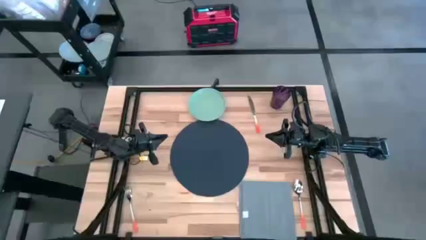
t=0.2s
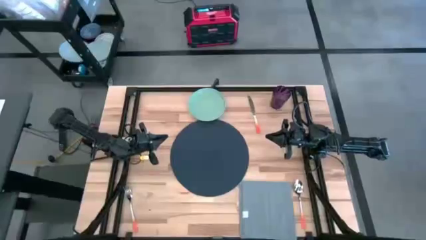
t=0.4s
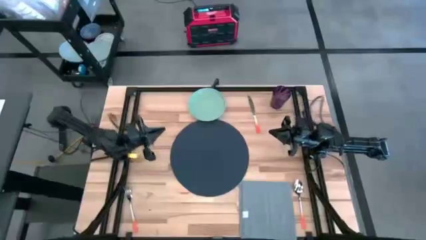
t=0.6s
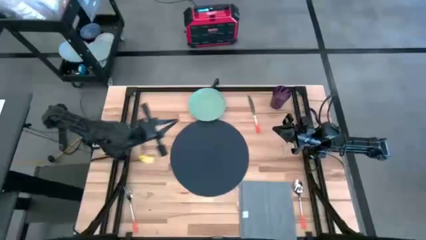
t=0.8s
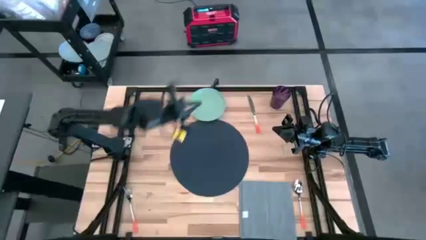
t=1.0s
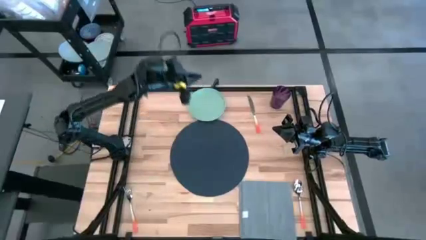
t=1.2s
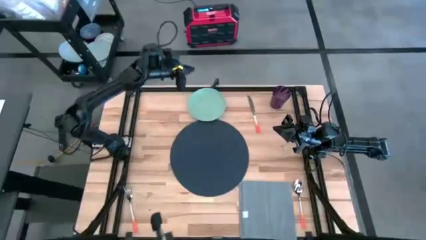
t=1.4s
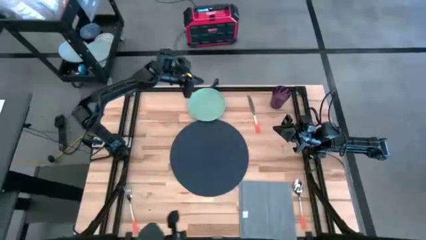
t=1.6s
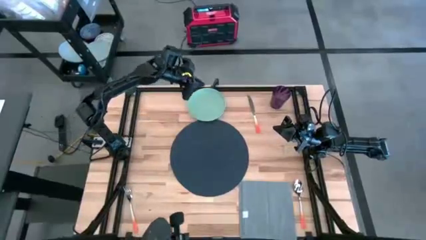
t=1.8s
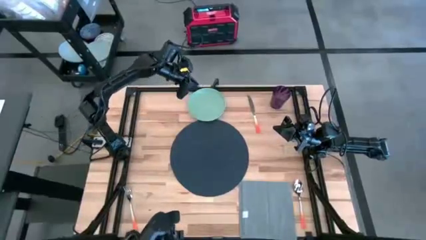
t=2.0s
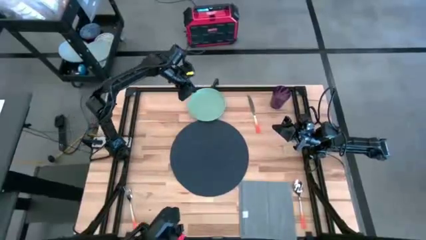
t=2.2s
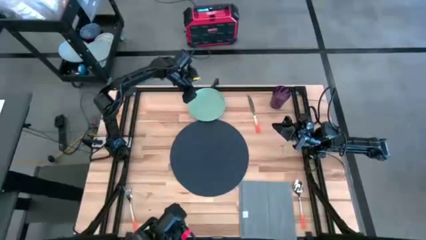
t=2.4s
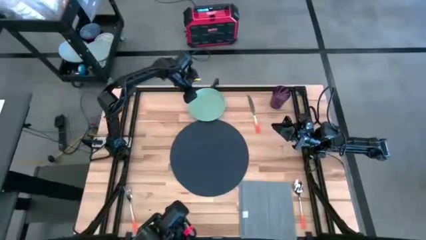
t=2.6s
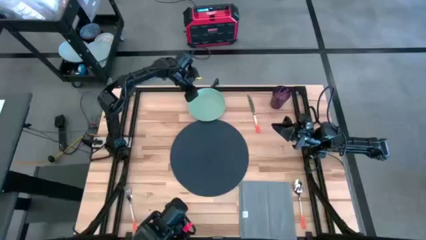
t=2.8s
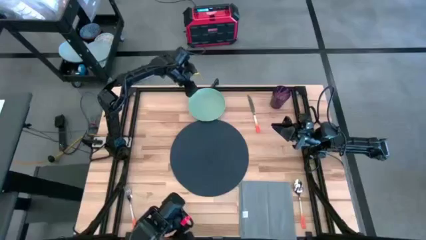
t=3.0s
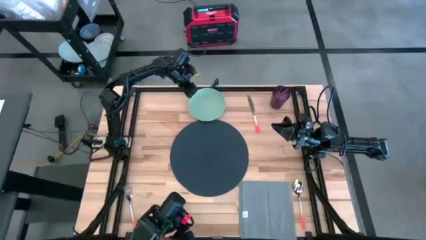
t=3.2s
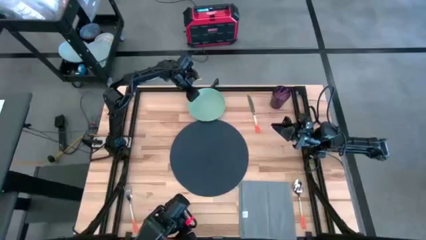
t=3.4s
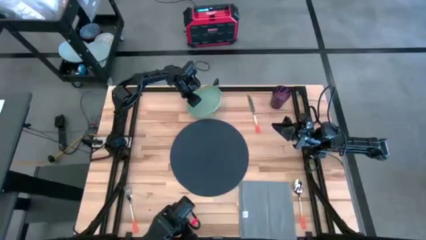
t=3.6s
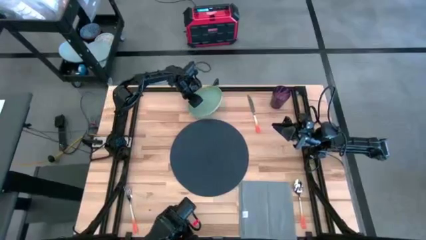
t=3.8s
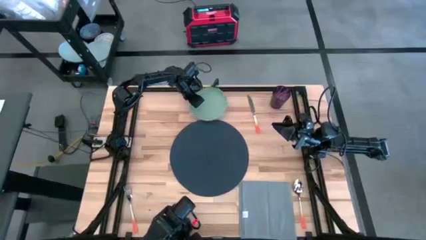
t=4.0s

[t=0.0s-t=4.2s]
Task: Set table place
Put the green plate on the blue placemat

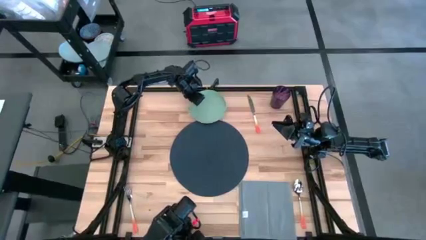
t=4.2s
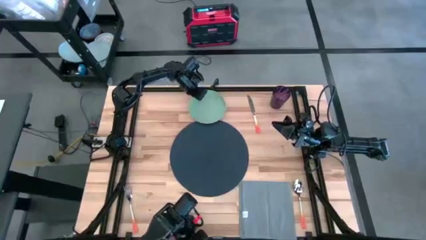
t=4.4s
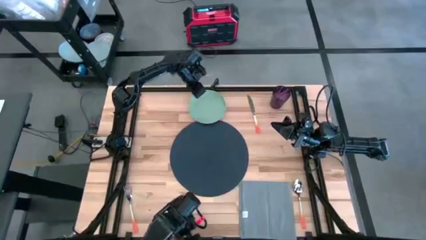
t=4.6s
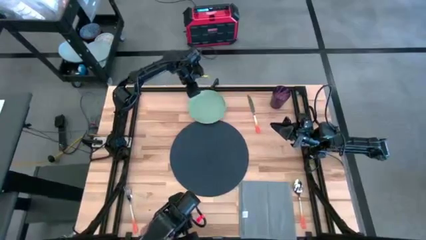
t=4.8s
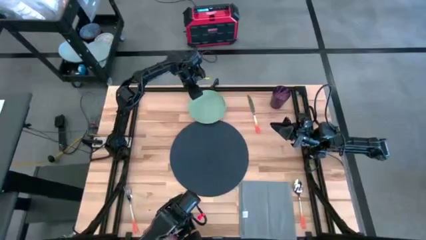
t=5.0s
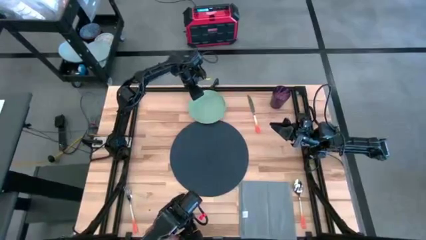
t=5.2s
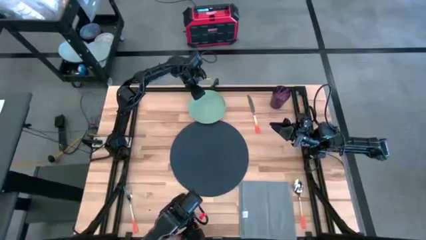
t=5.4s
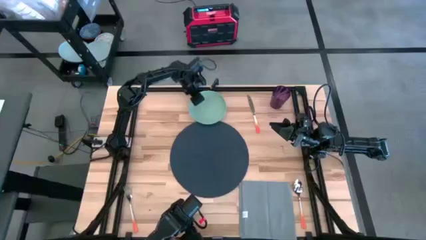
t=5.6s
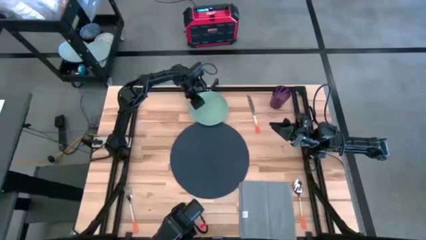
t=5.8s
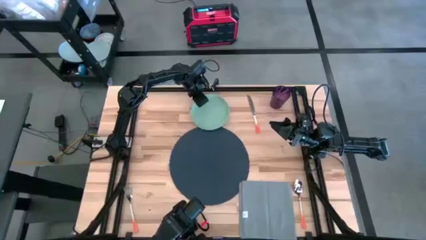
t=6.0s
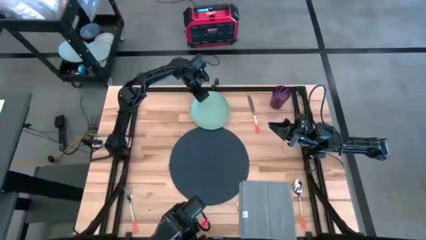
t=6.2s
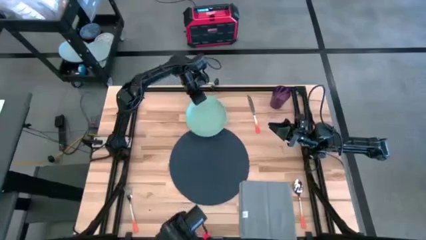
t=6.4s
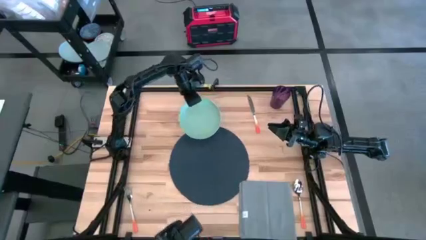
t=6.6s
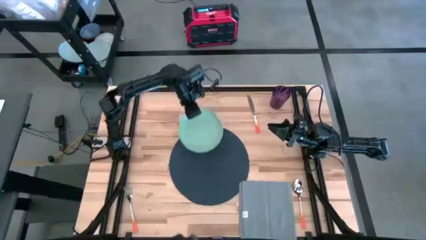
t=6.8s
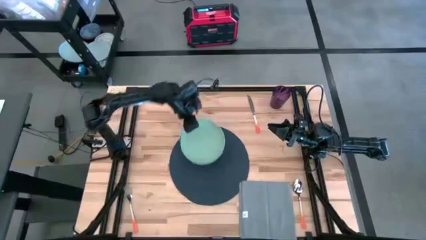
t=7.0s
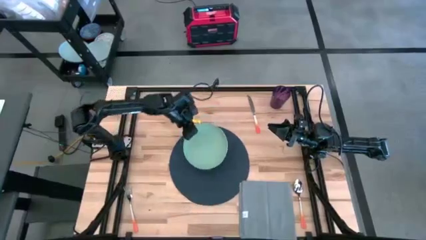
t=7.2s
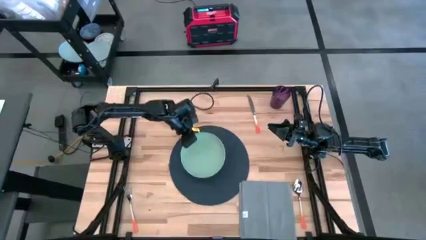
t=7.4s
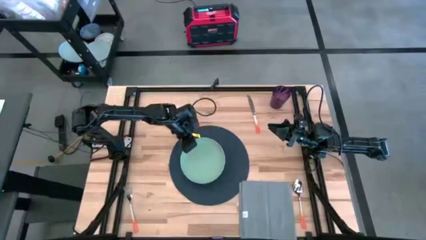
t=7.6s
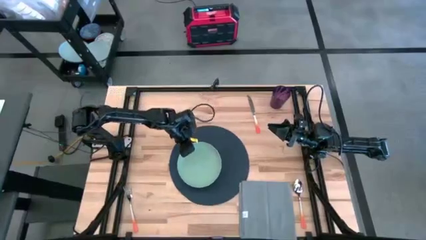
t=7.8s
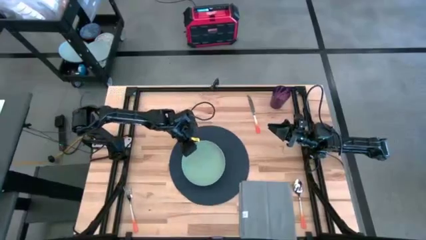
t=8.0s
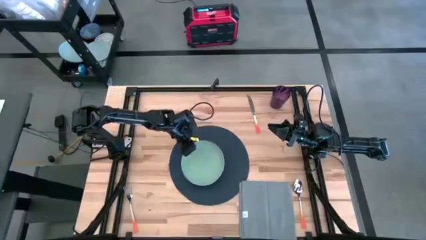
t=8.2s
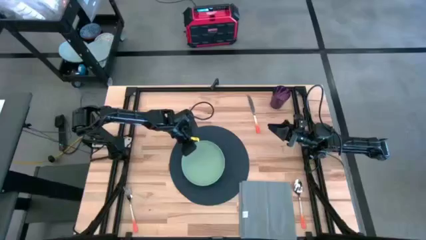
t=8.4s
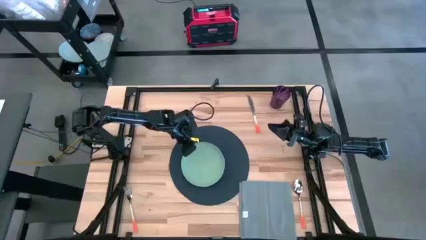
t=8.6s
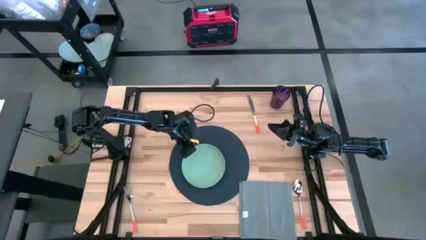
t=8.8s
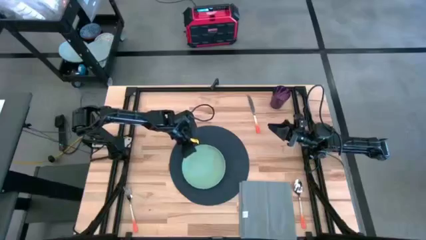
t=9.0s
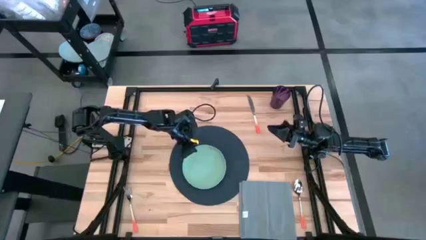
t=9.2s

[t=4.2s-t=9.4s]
Put the green plate on the blue placemat

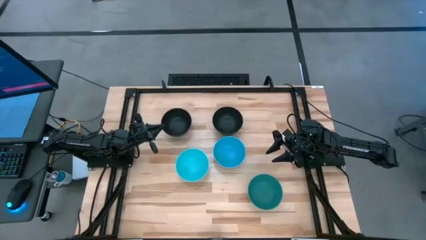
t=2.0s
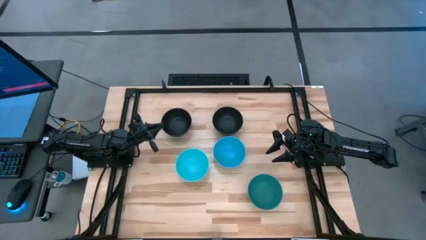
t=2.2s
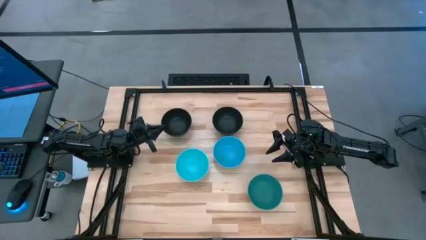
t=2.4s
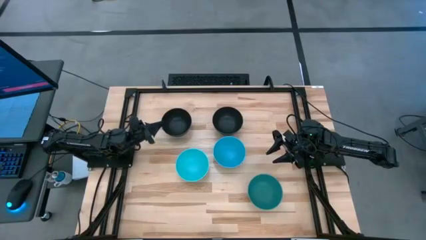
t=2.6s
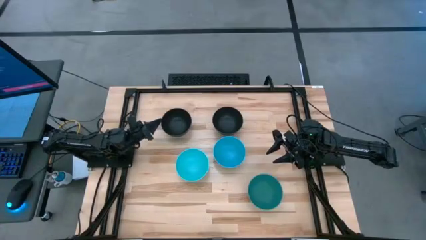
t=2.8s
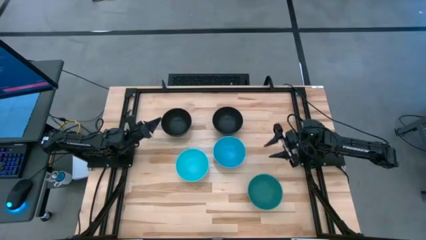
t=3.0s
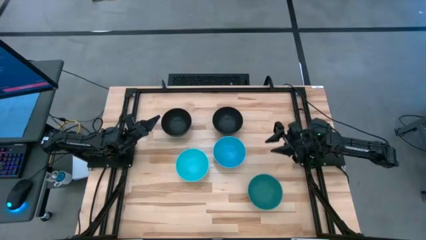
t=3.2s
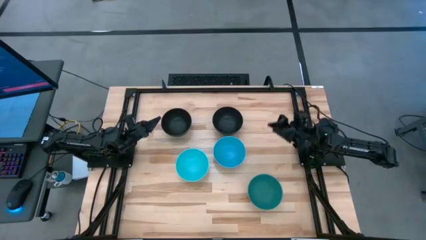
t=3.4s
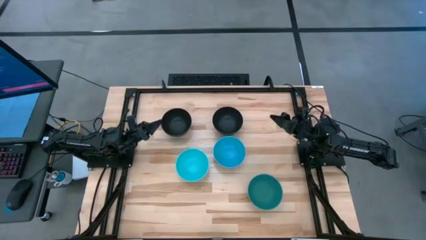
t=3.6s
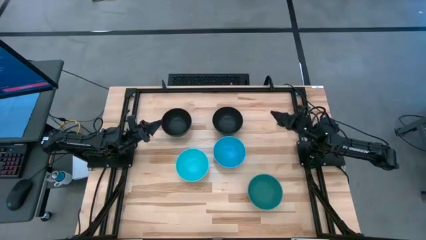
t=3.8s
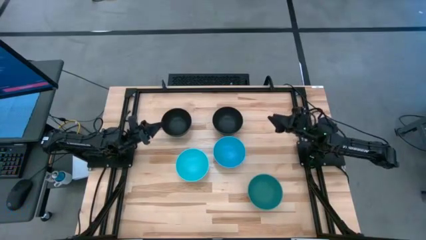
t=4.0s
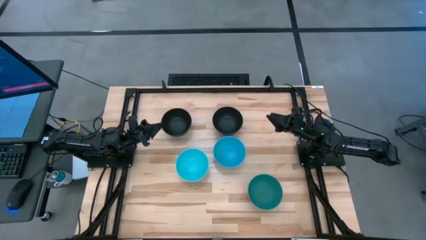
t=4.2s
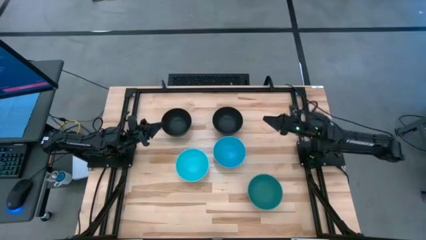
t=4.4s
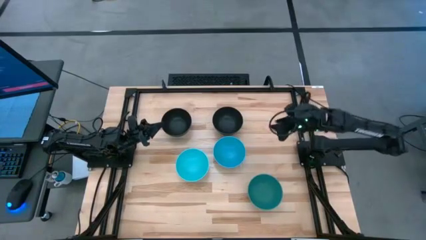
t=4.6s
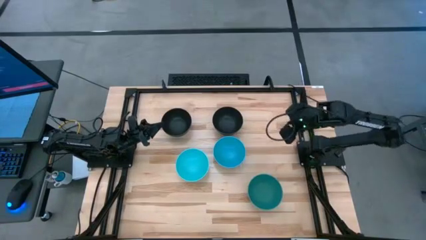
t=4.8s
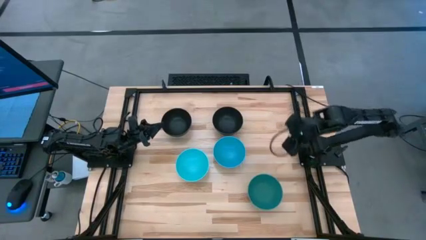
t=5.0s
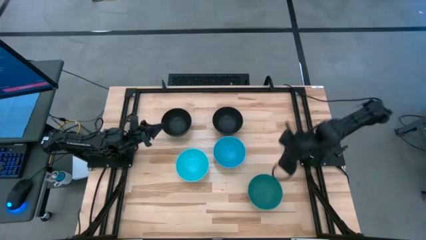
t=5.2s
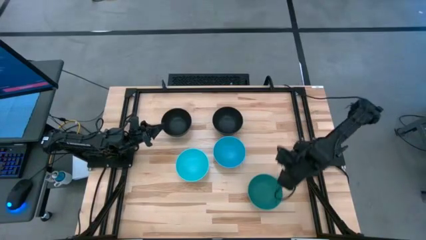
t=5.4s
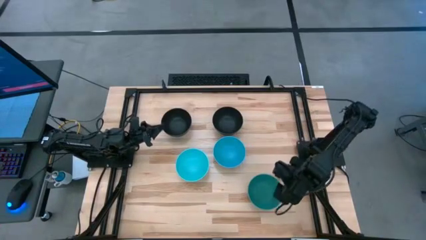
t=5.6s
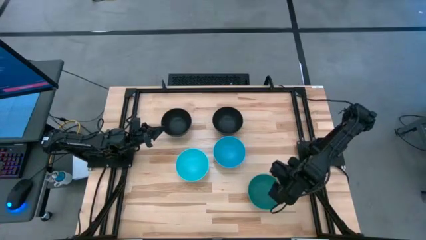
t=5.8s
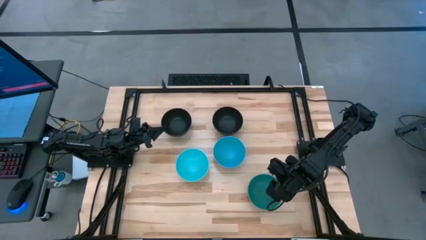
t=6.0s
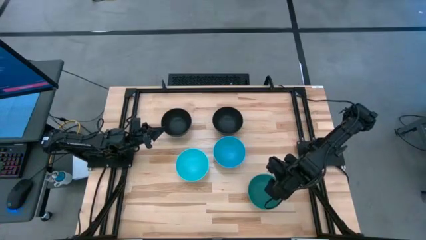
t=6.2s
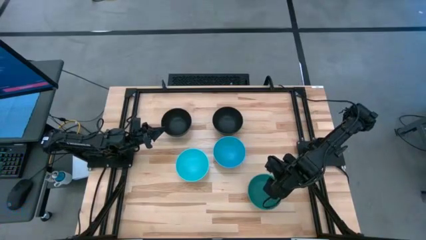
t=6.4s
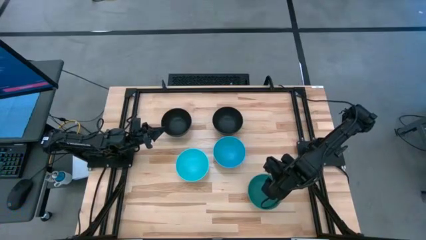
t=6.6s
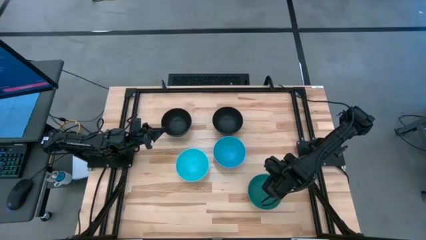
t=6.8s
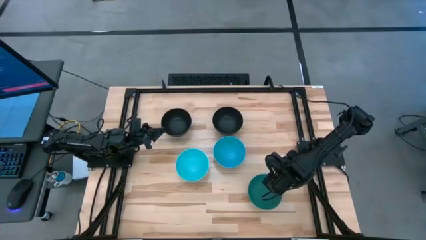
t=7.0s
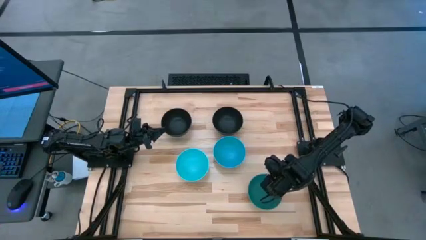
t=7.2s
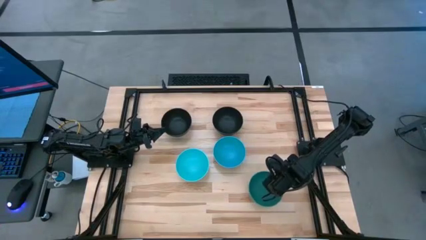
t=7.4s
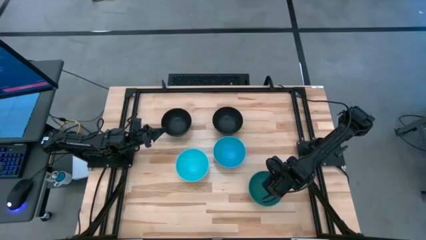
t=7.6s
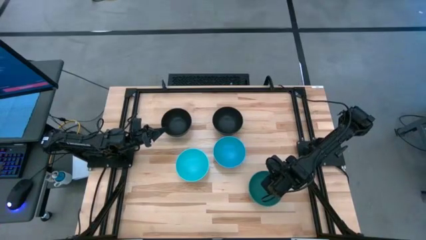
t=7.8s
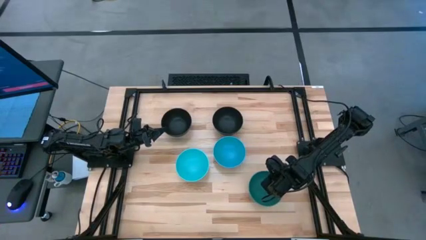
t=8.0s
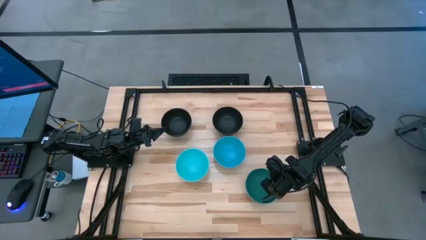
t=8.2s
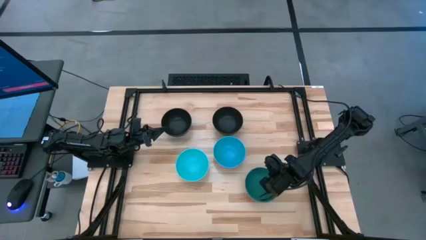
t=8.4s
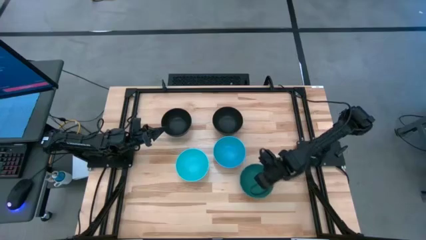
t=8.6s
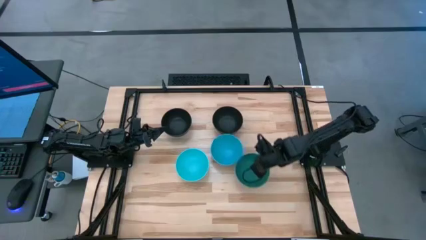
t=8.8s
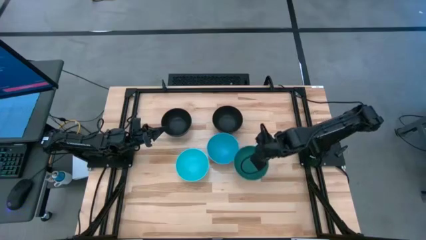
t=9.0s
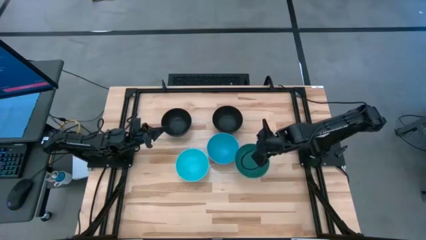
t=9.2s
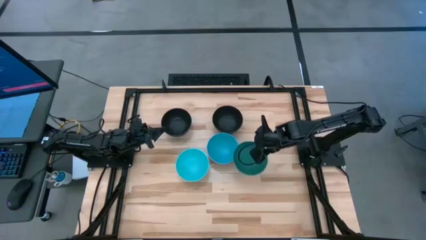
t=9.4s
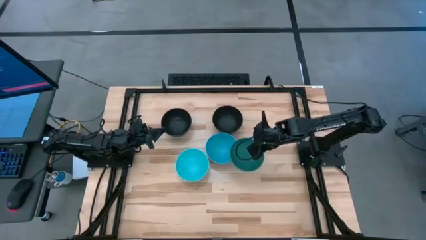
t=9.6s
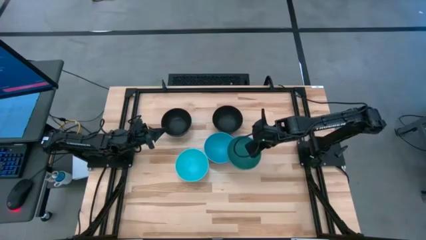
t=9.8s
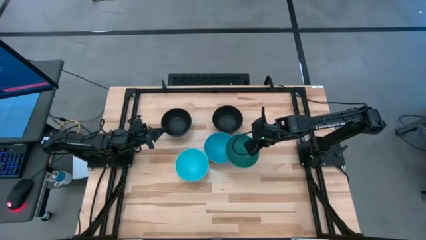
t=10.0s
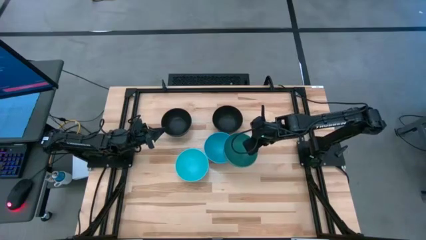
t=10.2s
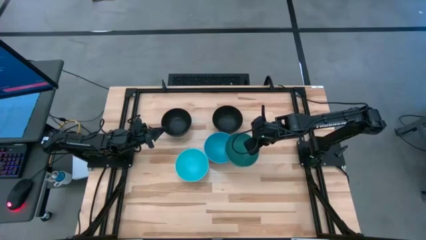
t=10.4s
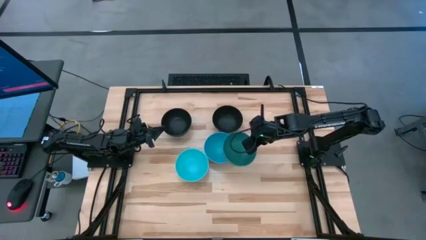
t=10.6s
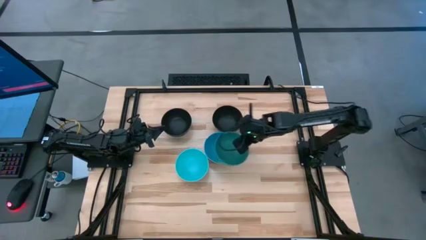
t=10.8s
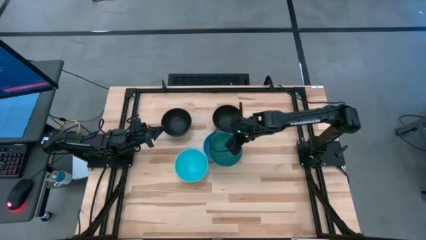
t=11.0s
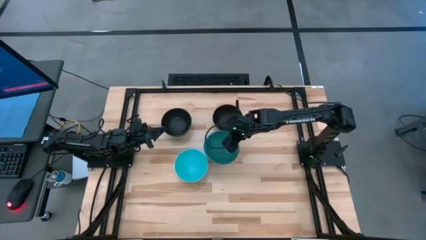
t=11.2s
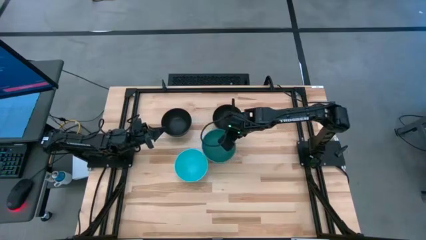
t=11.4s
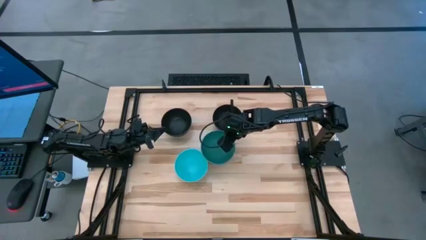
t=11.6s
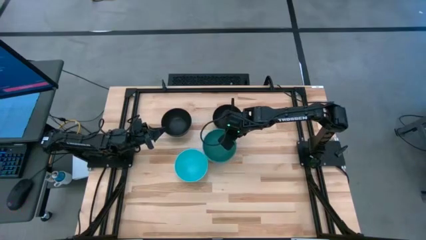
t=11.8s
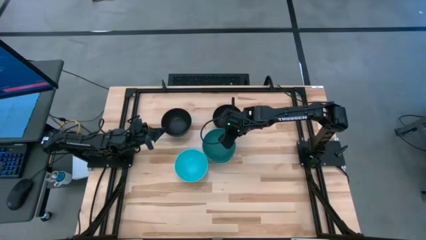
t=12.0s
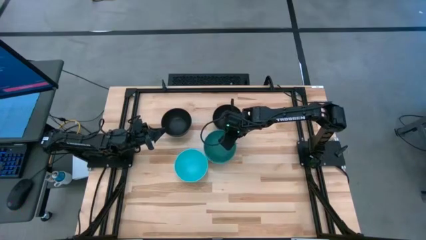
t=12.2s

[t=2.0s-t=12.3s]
Task: Nest bowls inside each other
Stack the green bowl on top of the right blue bowl
